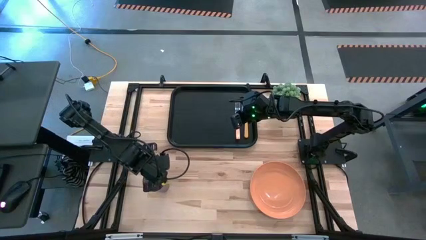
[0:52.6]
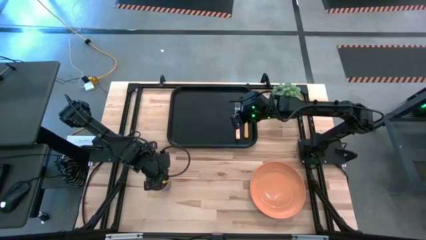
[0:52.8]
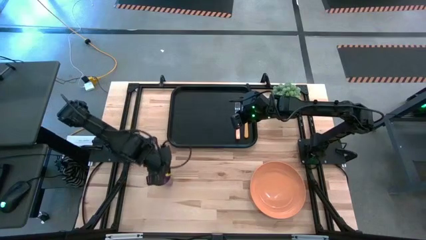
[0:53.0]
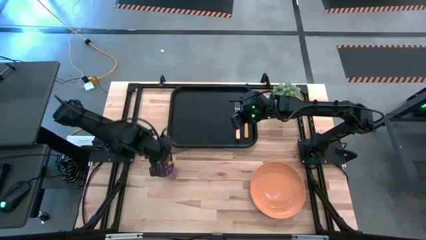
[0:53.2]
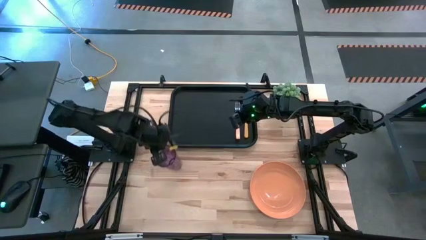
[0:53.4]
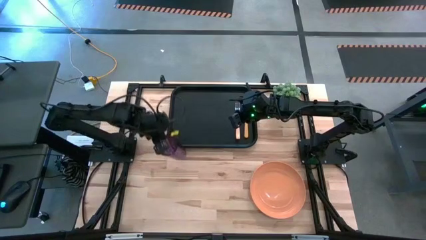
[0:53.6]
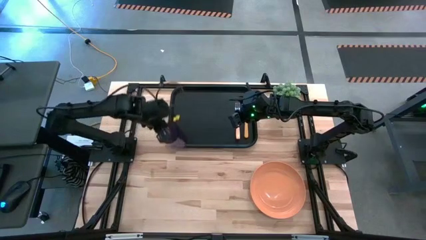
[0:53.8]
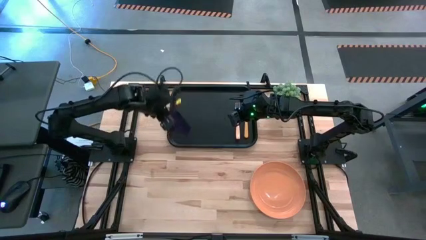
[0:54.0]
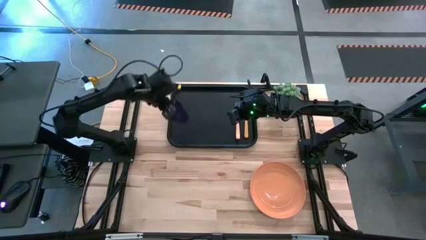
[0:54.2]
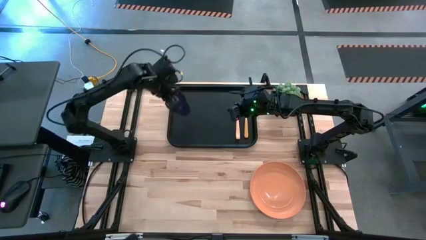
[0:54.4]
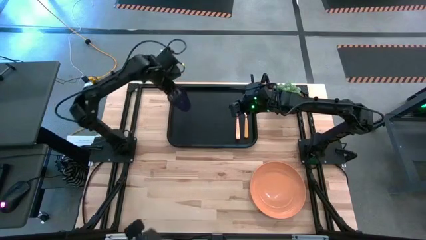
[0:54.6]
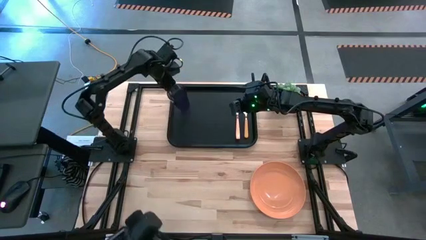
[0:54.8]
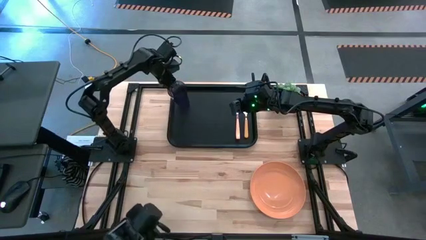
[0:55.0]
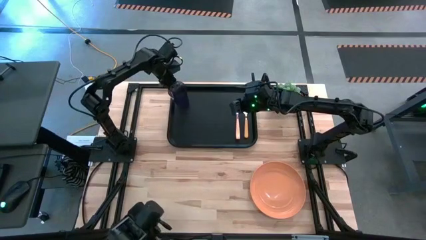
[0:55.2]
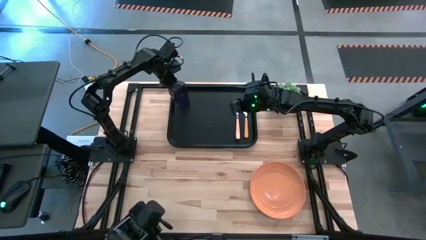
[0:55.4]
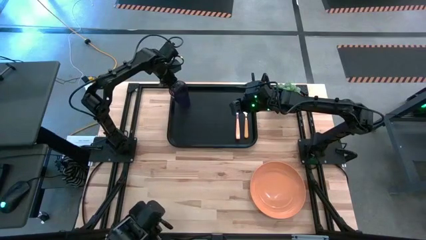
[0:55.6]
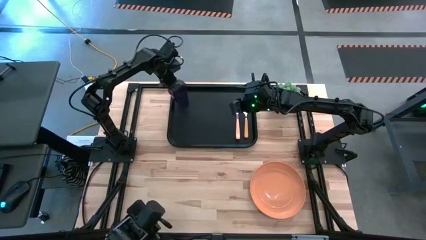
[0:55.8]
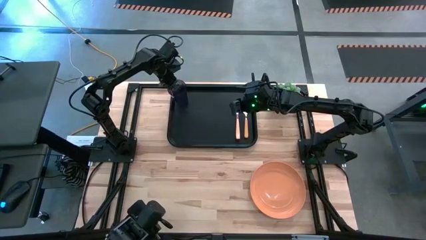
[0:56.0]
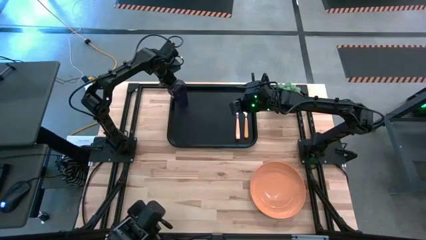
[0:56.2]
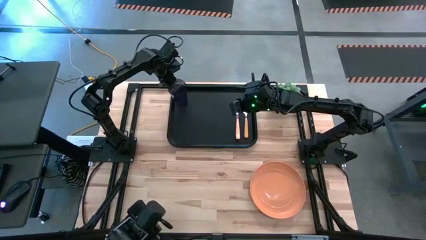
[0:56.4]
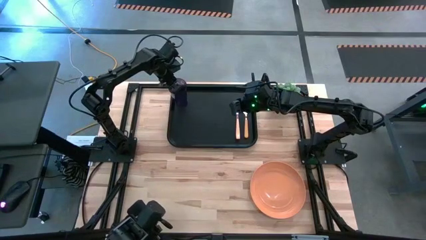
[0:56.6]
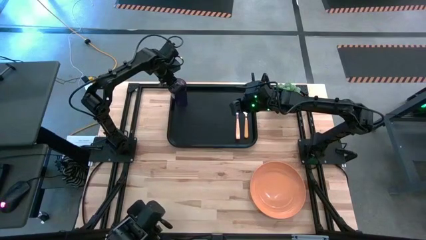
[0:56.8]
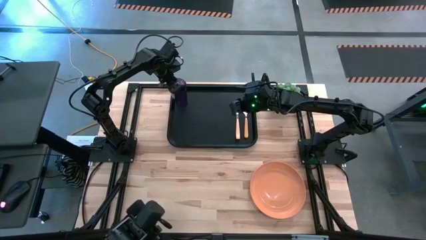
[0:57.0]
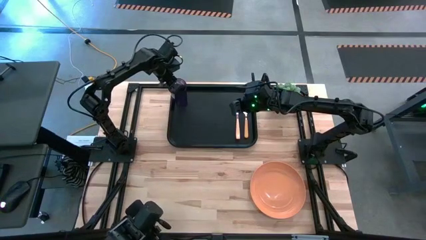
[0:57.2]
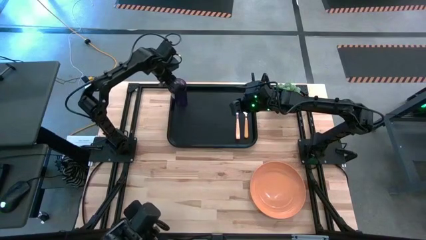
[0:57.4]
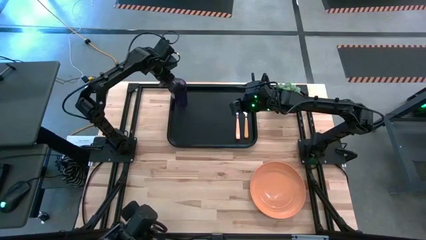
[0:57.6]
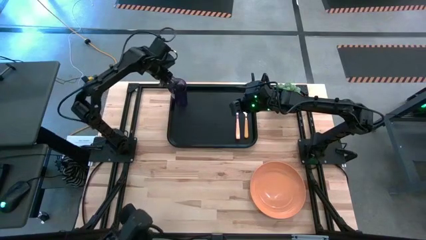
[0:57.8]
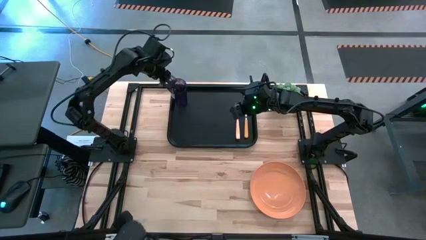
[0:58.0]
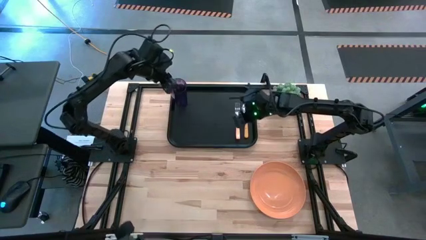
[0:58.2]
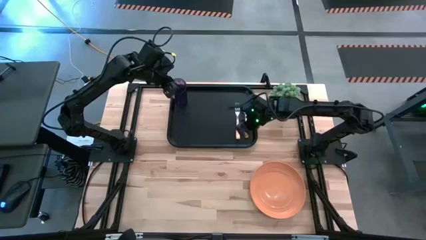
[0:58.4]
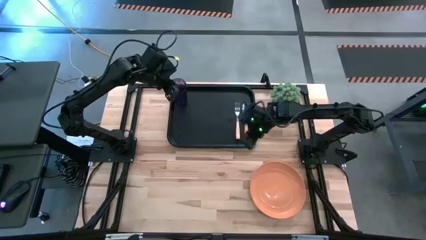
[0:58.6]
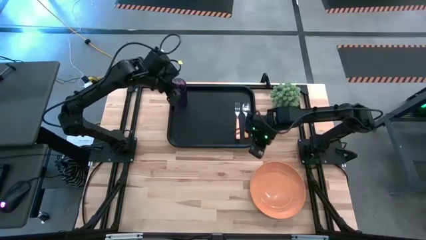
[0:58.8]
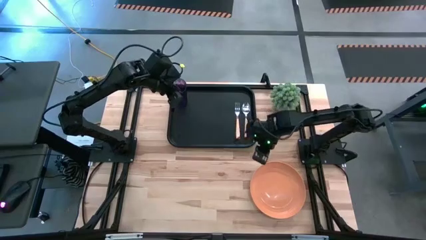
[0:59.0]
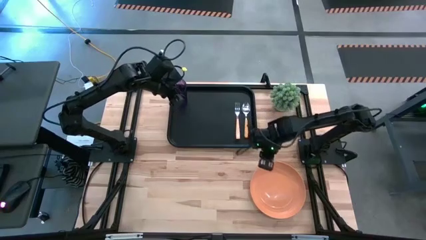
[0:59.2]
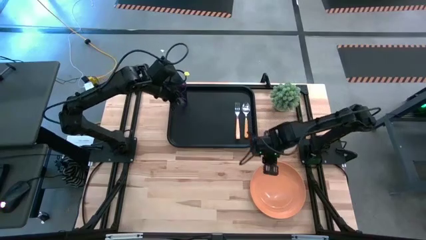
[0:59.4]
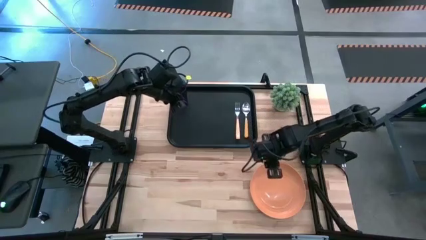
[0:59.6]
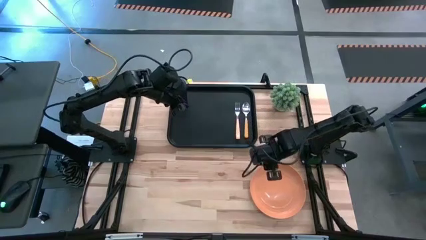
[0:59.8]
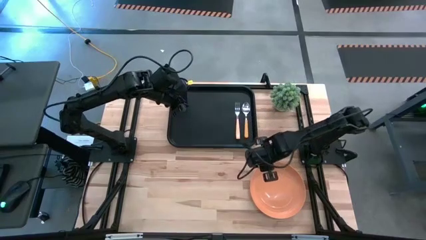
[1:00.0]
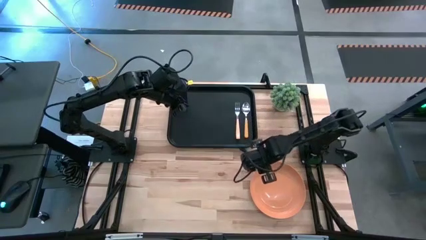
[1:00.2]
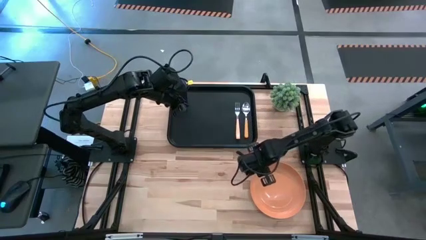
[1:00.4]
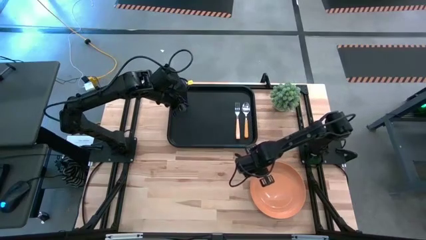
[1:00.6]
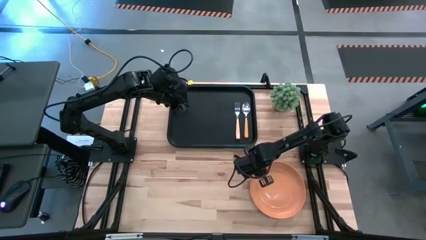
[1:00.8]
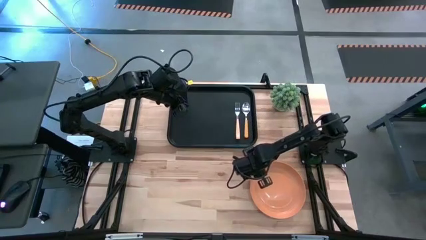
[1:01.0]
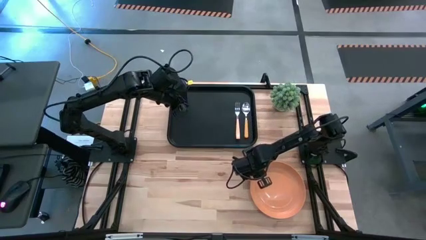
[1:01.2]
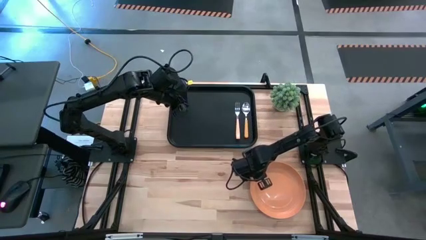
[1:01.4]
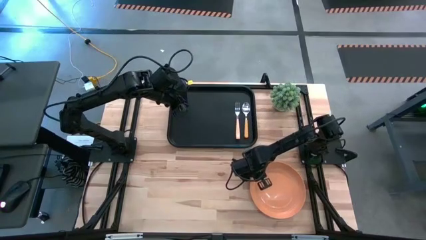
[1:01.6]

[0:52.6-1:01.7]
Task: Pick and place plate/cup/fork/spoon on tray
Put the violet glass cup on the black tray to the top right of the orange fork

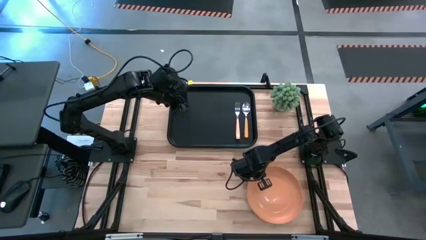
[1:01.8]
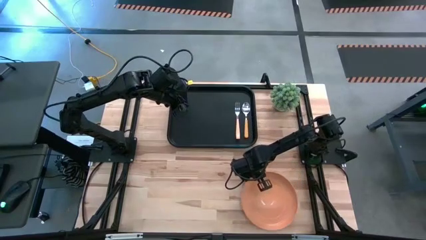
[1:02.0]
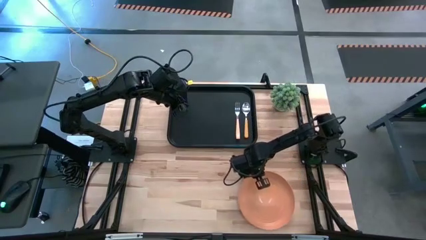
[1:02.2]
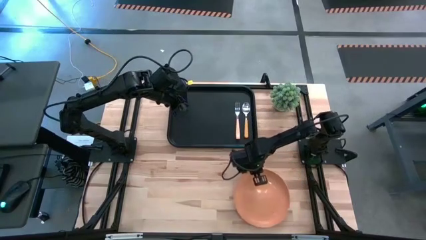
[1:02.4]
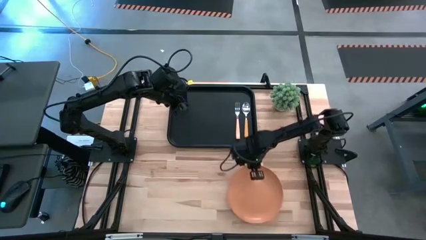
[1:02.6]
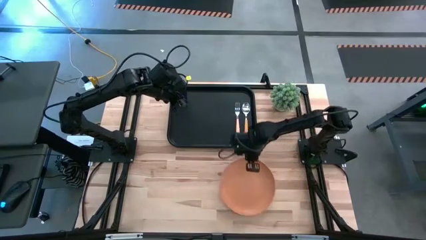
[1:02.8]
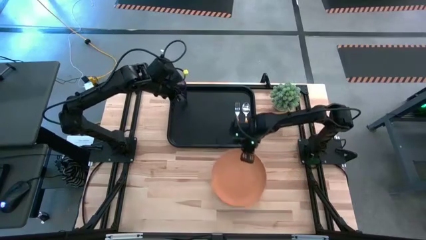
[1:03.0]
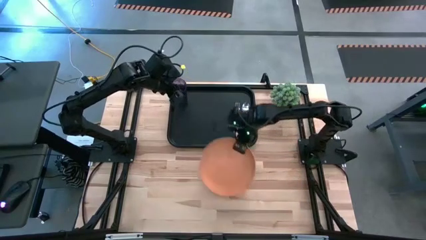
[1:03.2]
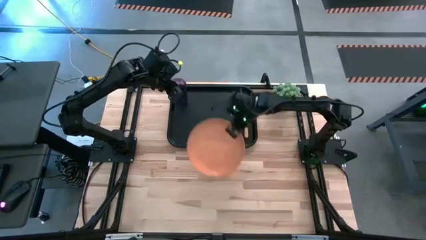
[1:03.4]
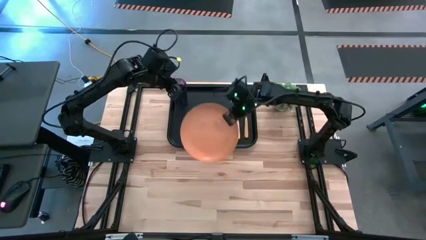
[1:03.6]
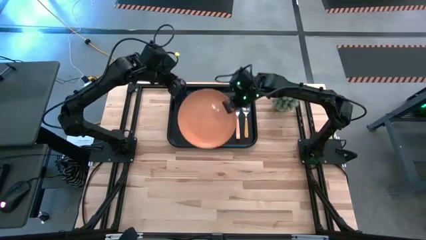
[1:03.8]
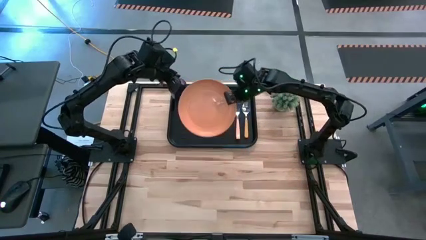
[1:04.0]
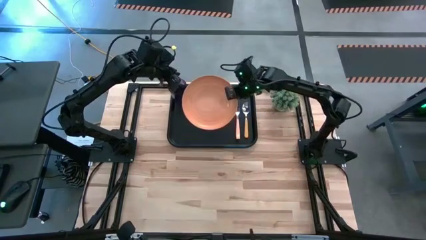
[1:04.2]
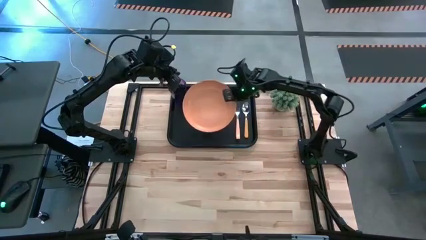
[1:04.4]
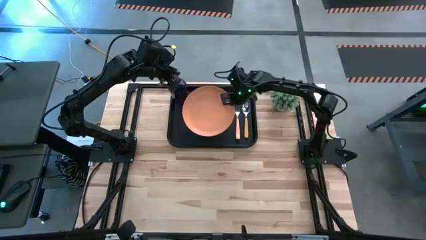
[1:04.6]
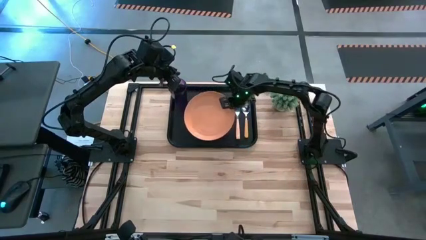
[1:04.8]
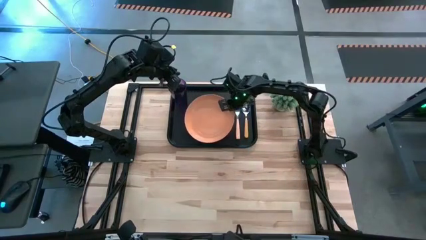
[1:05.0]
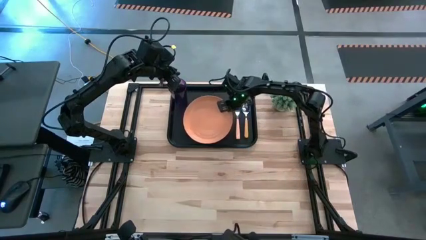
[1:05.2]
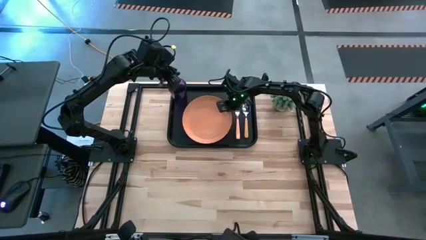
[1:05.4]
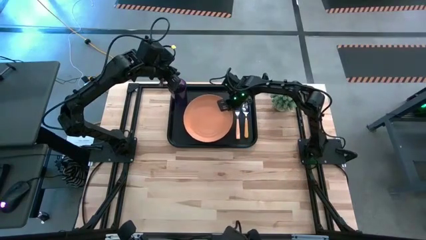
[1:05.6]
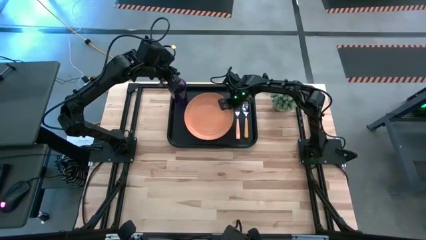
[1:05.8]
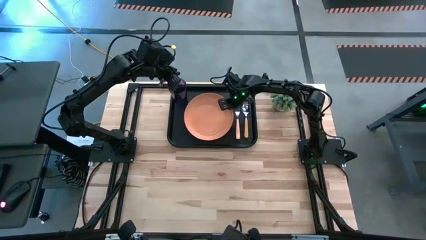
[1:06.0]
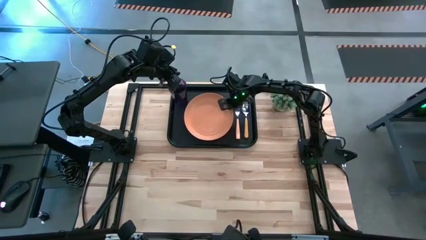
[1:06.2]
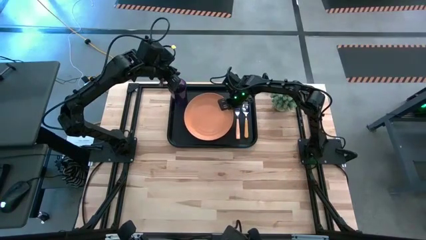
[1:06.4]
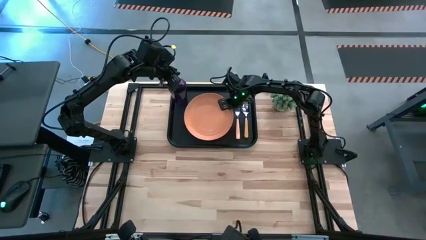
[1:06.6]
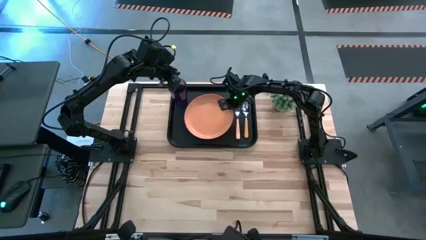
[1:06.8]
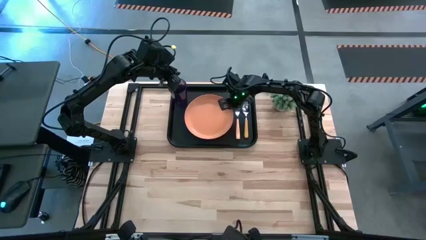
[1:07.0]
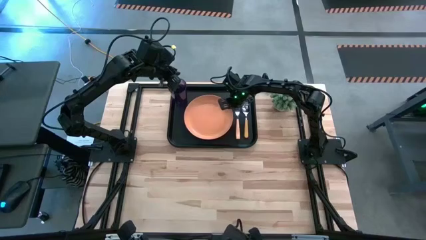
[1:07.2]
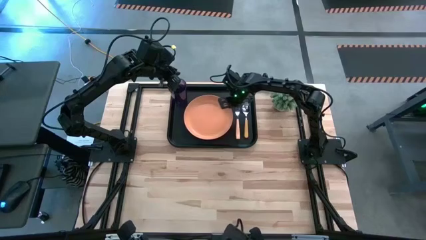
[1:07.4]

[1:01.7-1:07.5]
Put the orange plate on the black tray to the bottom right of the violet glass cup

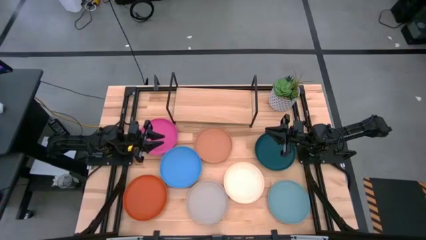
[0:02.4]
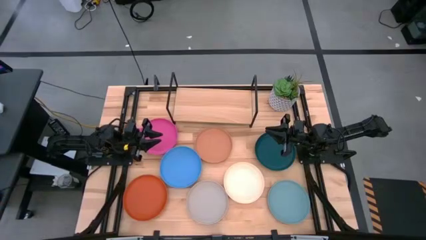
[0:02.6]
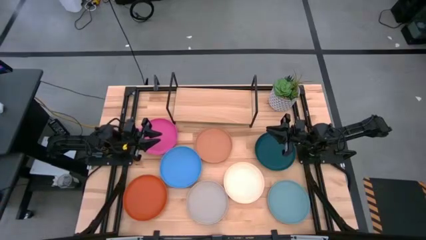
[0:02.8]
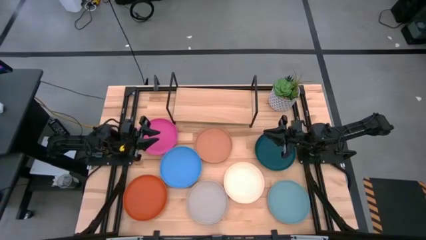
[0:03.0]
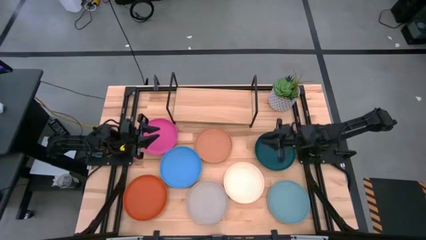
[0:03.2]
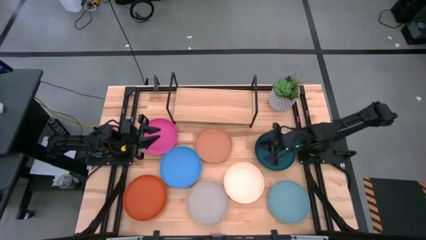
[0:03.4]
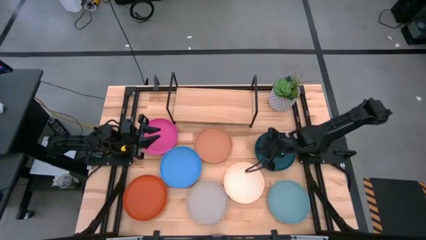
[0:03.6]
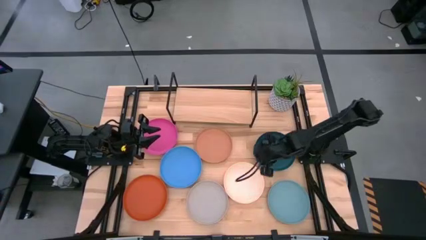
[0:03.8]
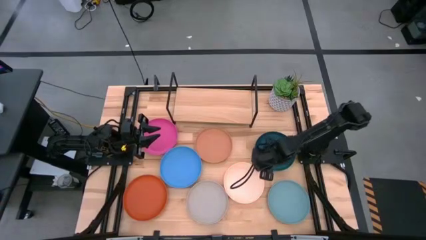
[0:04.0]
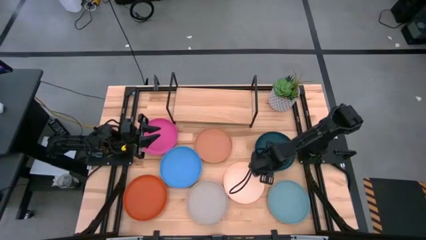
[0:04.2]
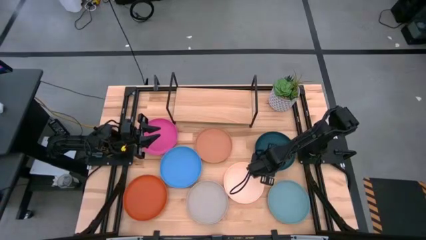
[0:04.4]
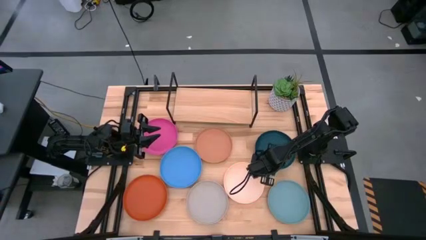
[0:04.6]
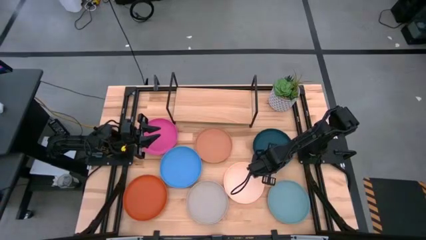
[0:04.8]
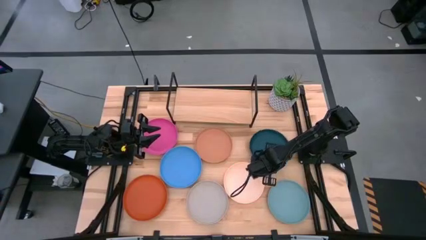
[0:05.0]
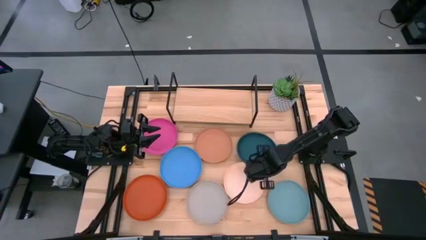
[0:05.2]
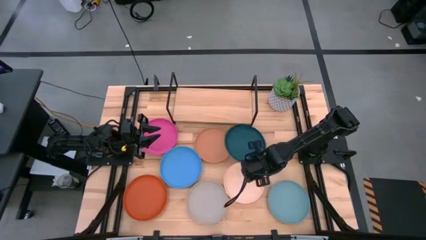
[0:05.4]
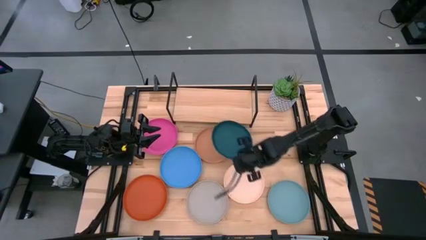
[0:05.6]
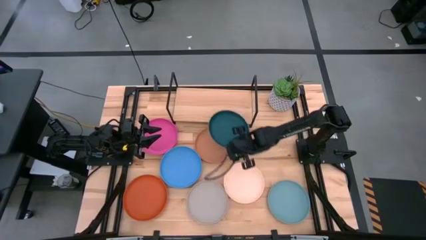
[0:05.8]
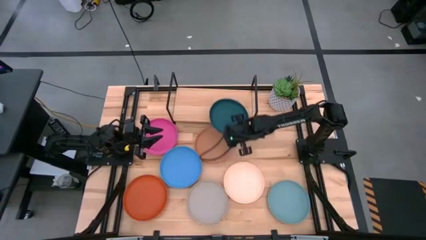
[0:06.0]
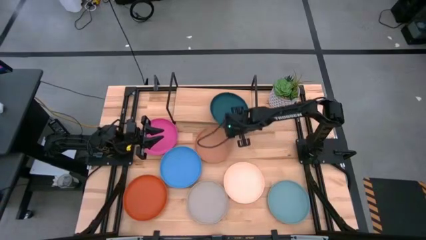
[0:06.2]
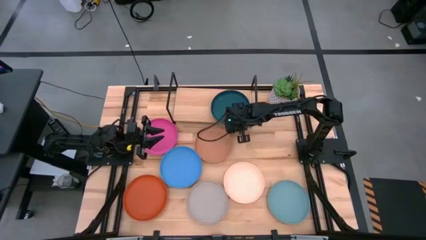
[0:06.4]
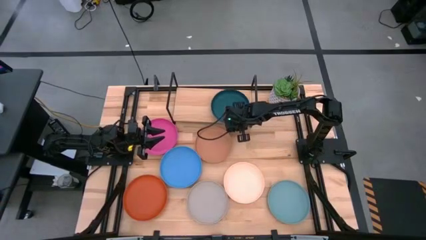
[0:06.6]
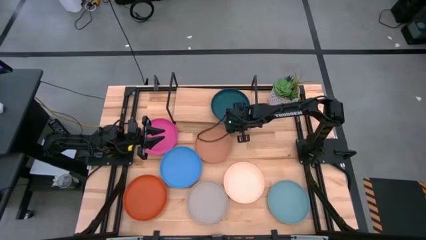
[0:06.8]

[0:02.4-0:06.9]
Task: Place and stack plates onto a shelf
Put the dark blue plate on the shelf
